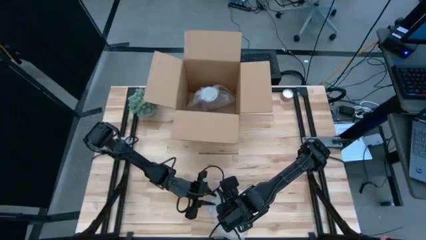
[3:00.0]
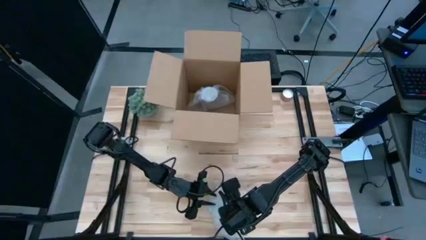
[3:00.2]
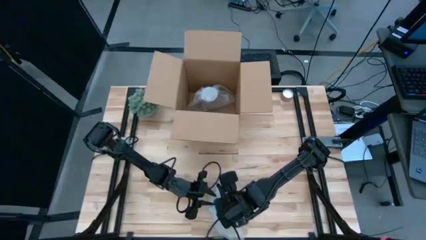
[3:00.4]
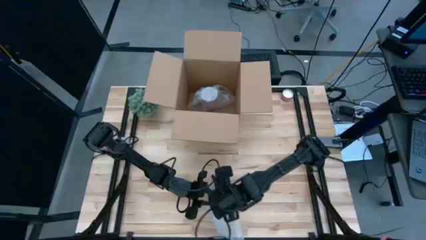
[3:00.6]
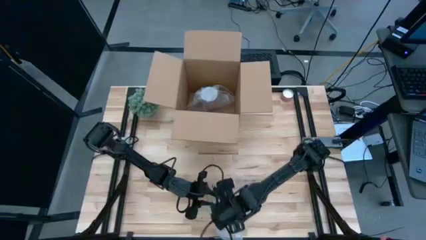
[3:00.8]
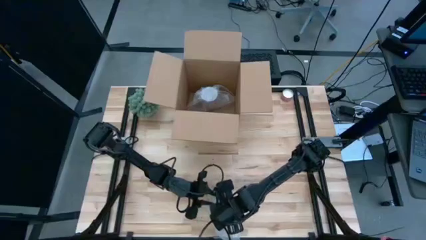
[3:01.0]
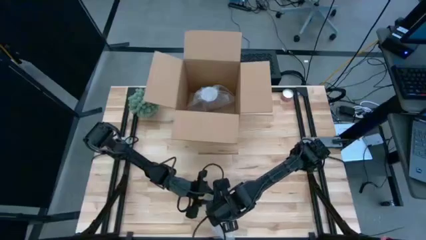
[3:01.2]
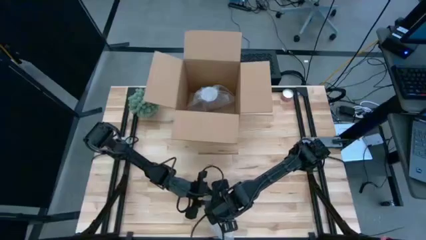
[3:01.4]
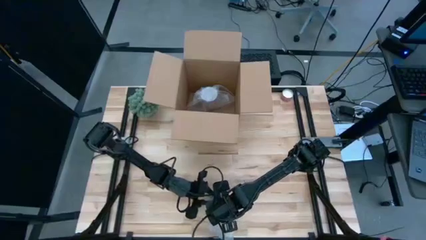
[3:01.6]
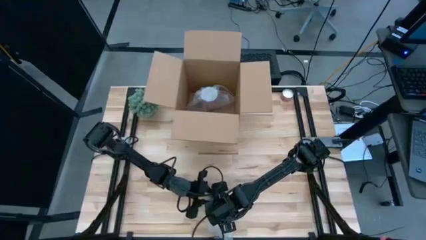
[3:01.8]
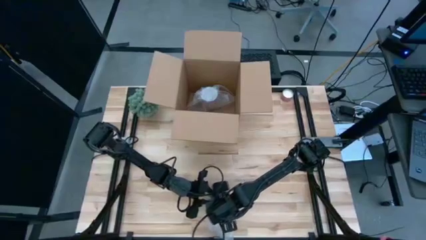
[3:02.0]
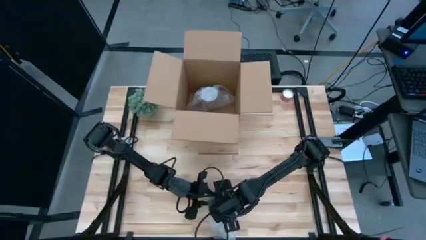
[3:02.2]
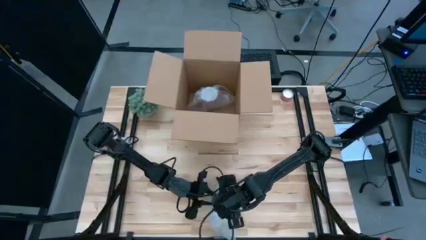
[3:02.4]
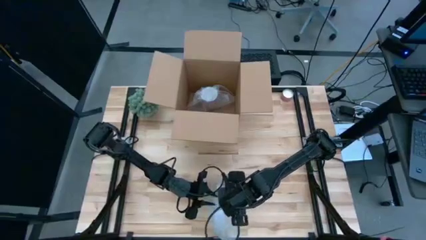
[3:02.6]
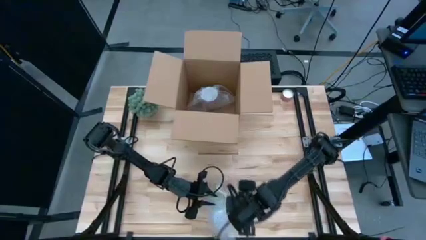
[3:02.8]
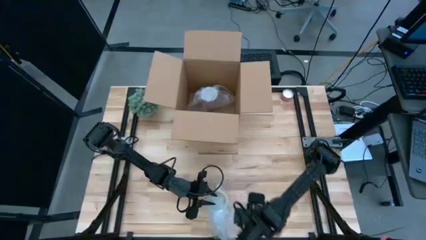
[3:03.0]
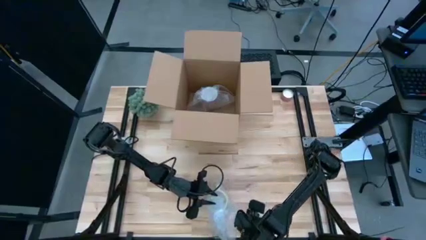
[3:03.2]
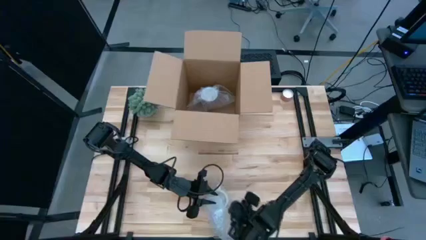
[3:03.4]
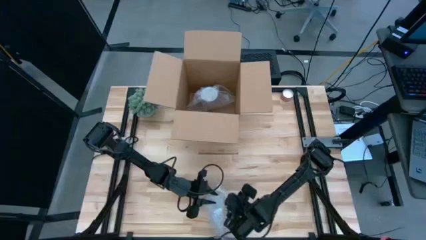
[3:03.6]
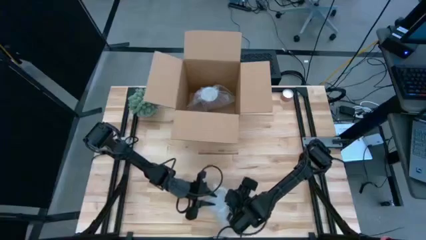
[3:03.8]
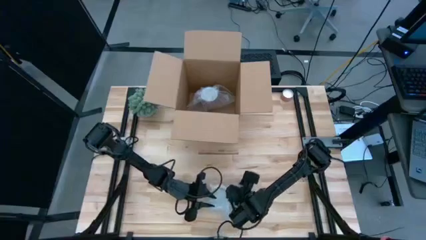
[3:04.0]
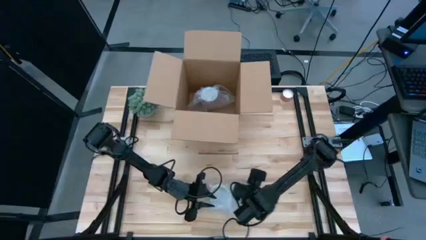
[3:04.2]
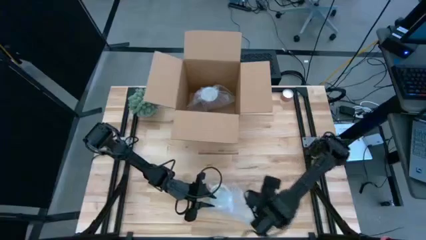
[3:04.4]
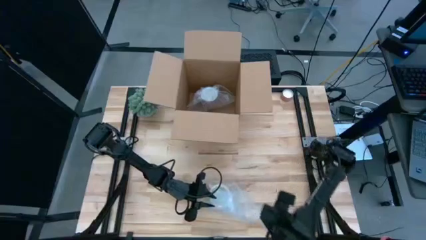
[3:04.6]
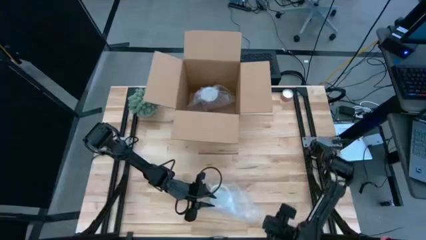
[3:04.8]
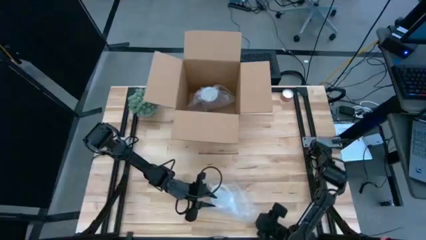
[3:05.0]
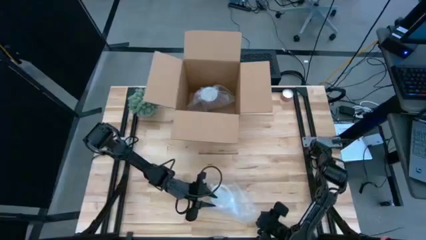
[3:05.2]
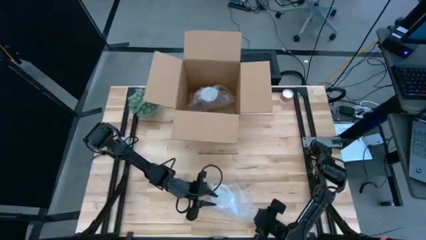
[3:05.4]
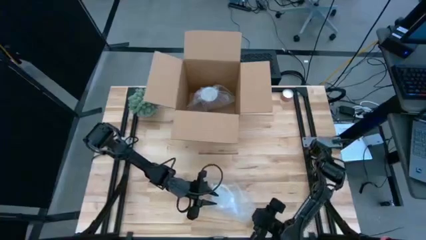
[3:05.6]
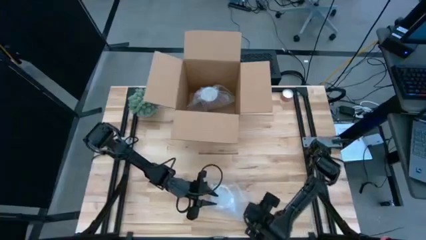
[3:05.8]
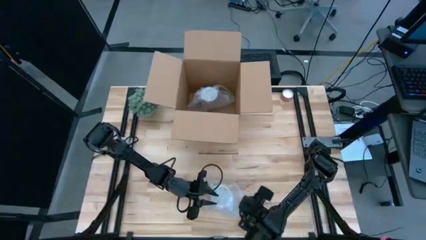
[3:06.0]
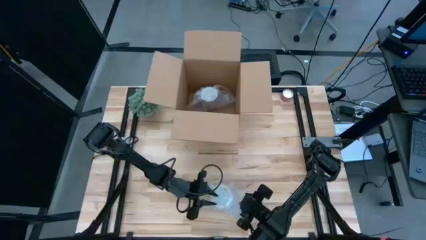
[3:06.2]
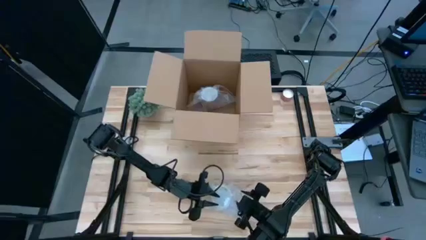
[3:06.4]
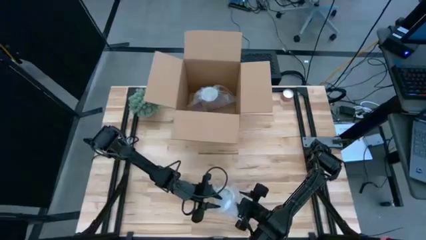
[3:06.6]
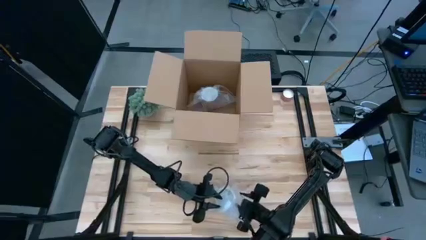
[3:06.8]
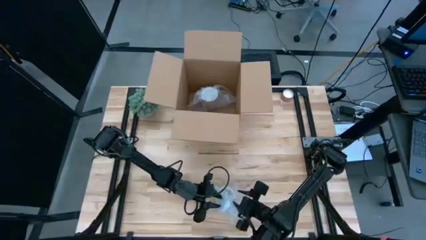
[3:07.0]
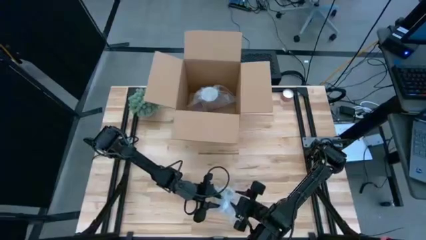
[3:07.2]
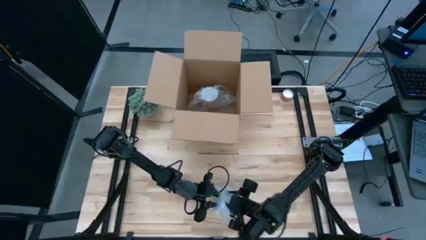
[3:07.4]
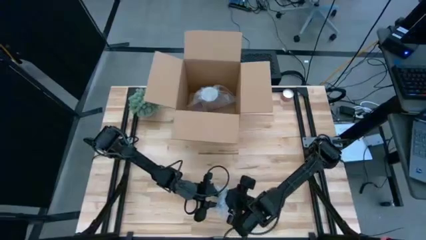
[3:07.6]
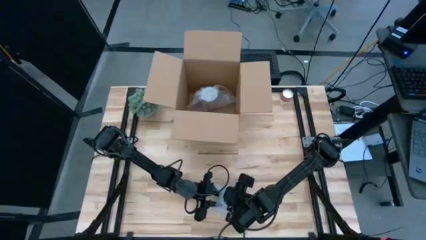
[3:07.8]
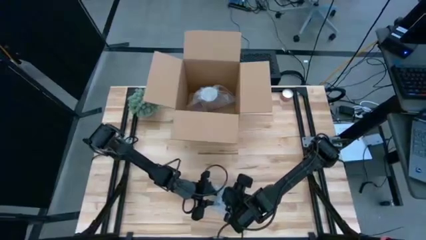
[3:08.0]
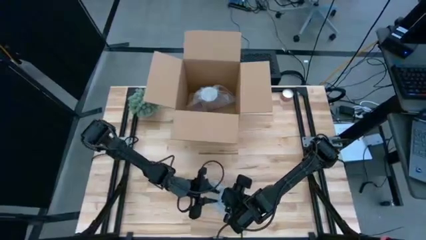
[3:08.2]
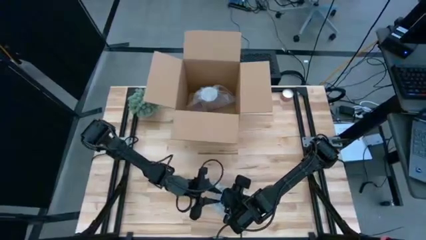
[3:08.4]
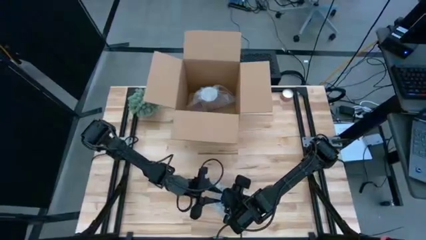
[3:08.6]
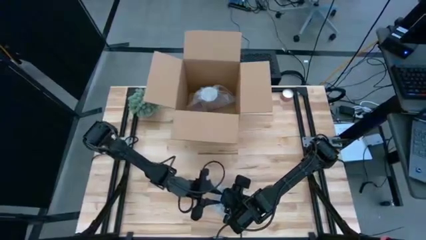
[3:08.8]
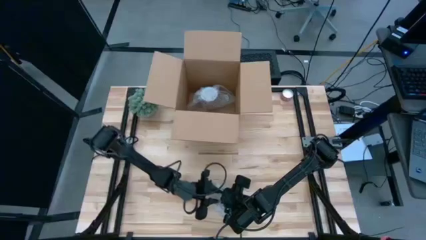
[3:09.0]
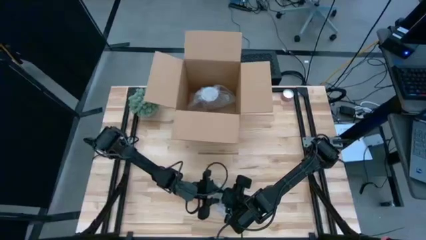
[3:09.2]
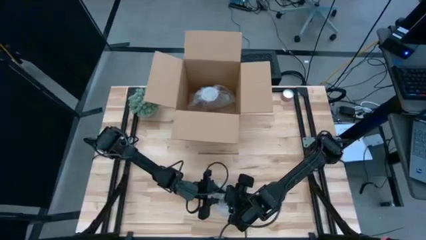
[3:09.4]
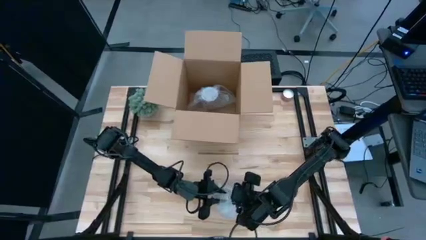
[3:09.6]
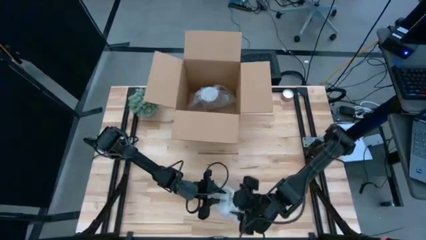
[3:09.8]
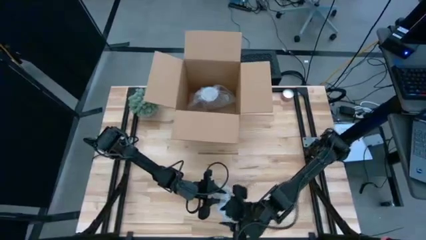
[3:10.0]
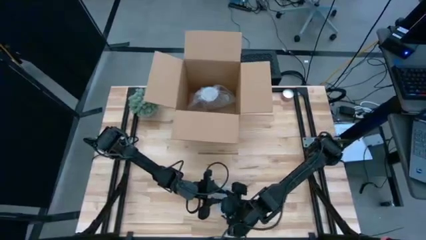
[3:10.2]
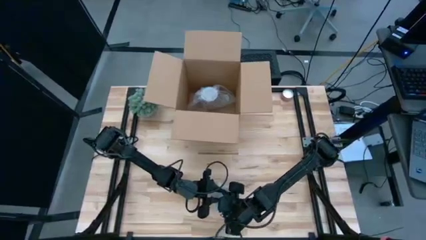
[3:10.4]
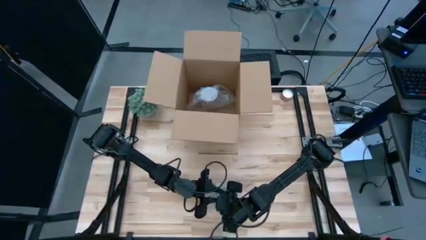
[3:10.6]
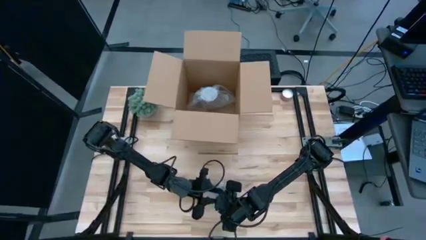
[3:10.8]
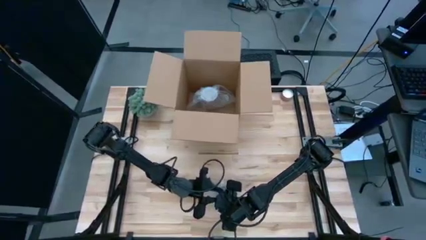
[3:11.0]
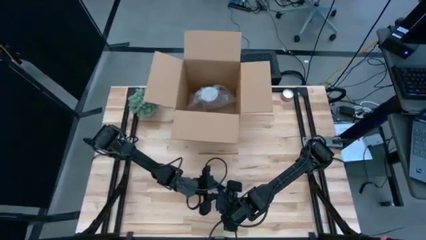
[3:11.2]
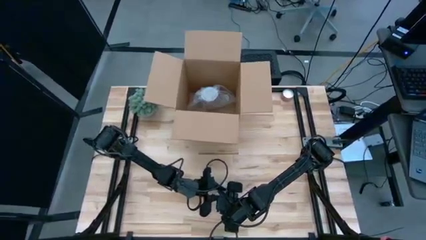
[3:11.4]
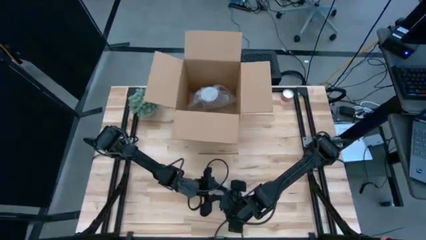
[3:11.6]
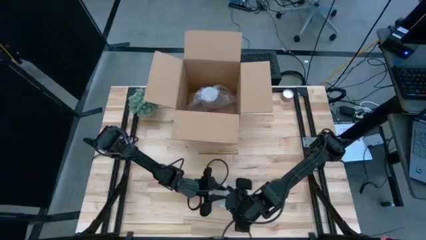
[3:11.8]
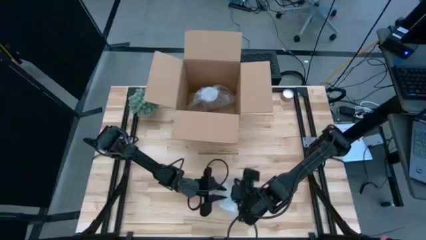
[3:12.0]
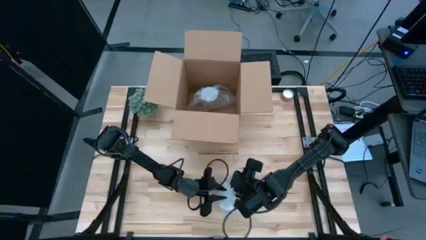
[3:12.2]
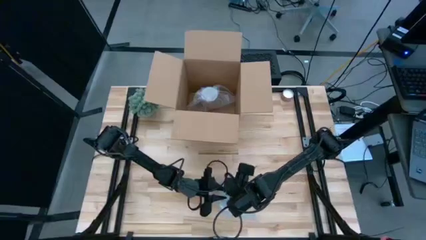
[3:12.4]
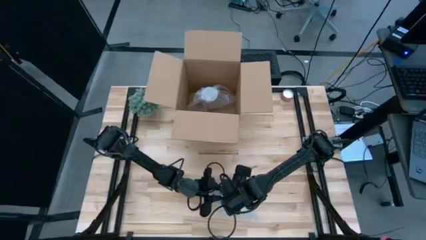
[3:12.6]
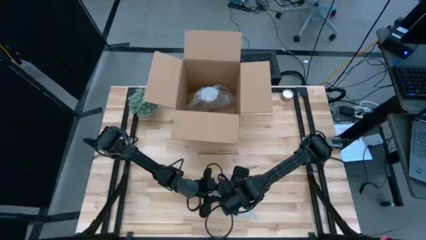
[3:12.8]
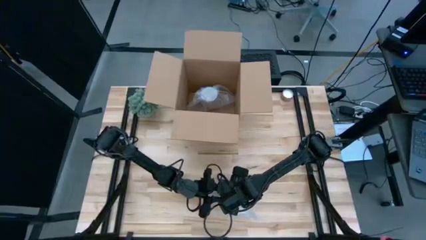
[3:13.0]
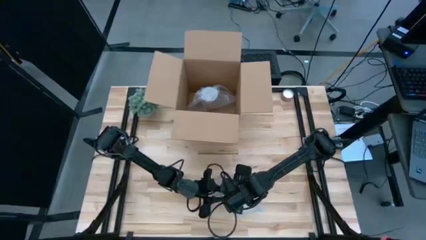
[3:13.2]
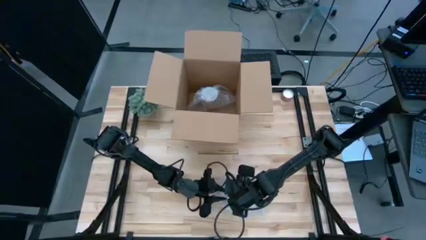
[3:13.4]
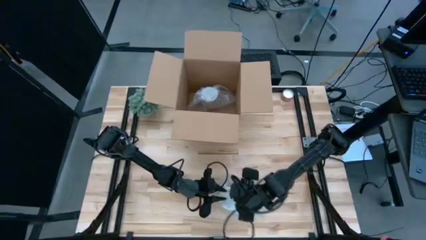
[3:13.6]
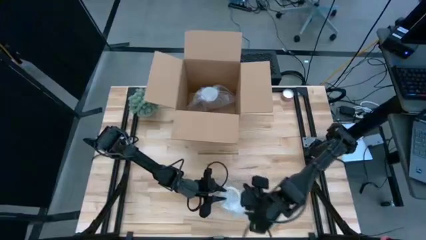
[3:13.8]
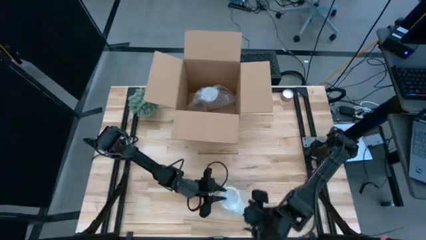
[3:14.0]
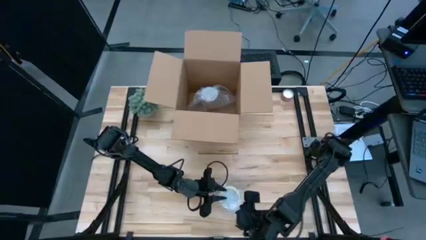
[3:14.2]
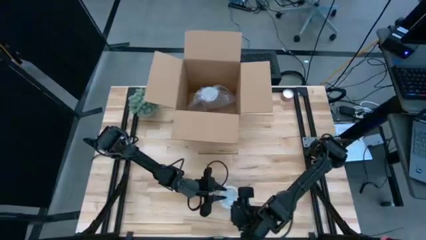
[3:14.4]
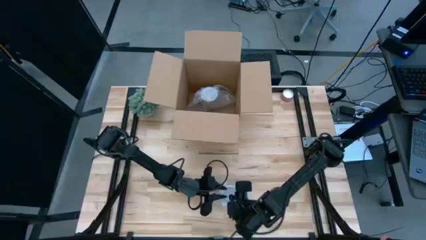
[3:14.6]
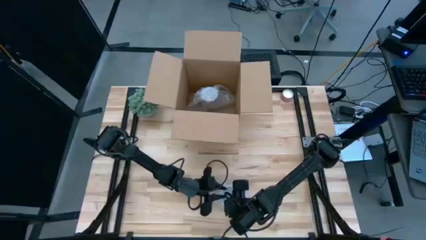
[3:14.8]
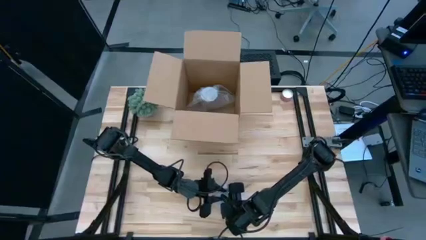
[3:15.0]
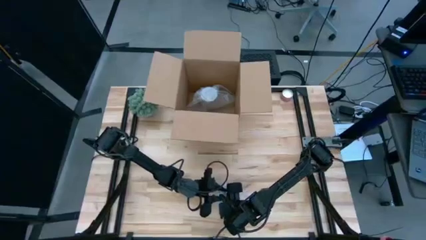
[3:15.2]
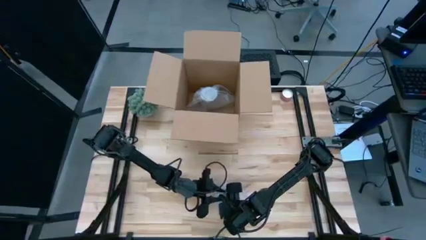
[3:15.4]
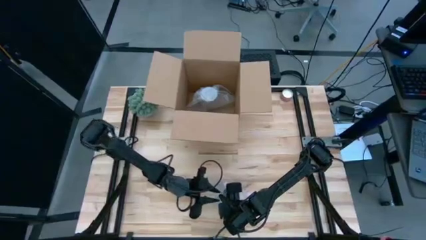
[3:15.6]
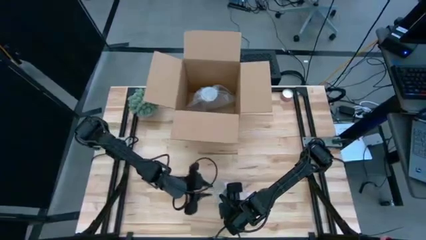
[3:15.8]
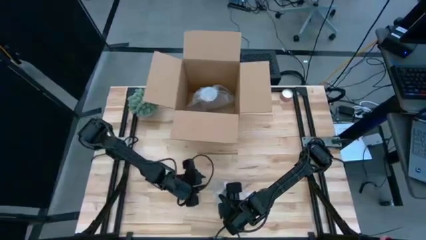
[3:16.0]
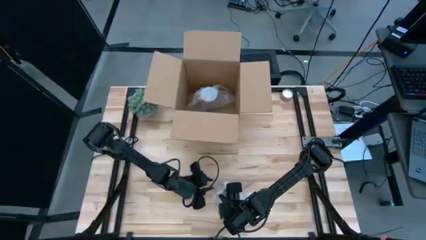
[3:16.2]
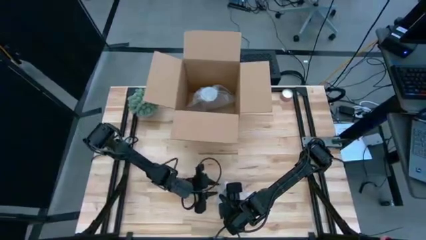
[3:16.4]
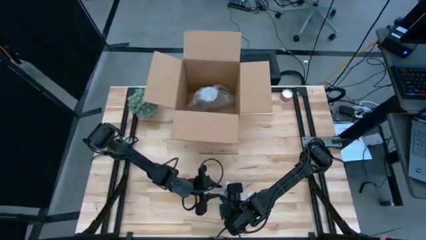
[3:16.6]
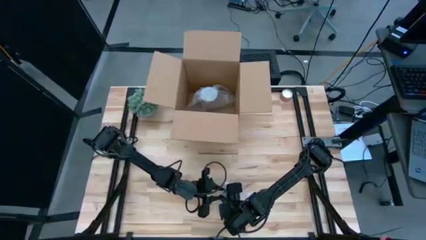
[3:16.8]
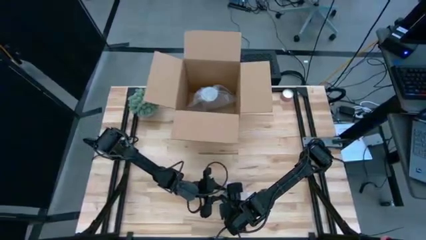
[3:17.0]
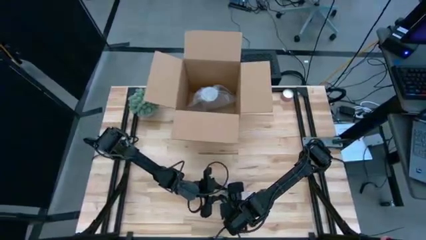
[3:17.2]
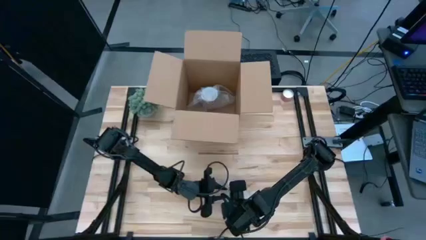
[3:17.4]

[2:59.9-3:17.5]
Task: wrap mug
Wrap the yellow patterned mug with bubble wrap
